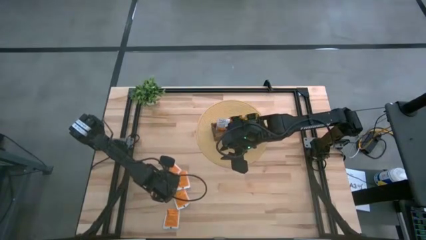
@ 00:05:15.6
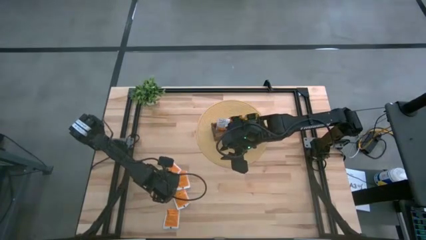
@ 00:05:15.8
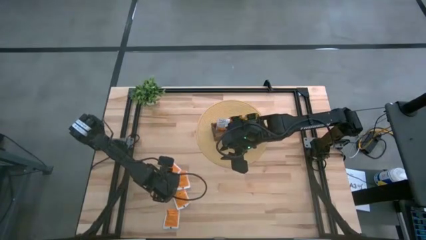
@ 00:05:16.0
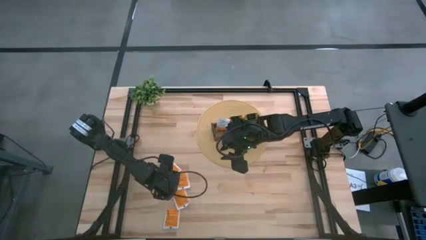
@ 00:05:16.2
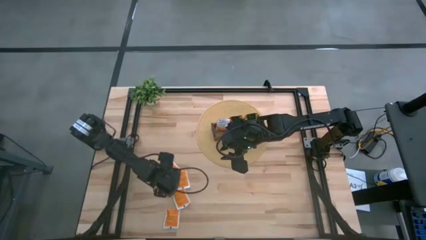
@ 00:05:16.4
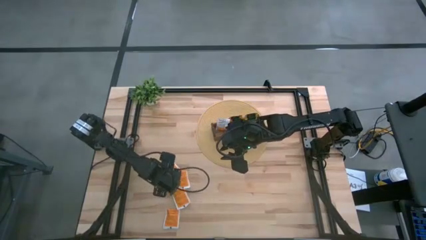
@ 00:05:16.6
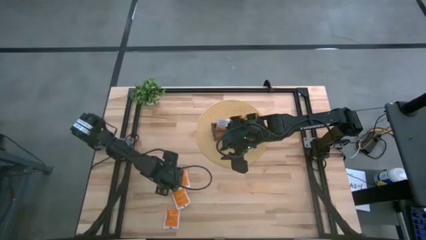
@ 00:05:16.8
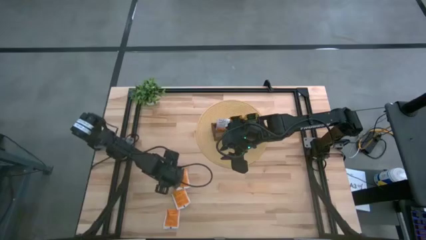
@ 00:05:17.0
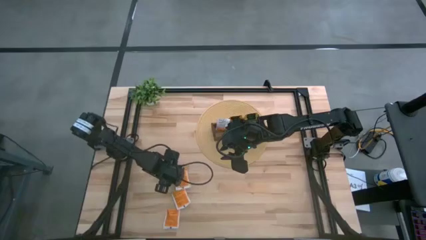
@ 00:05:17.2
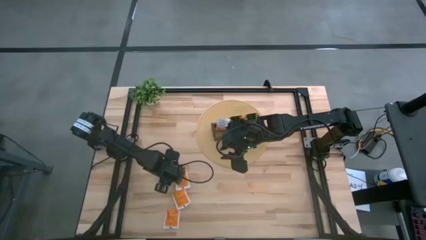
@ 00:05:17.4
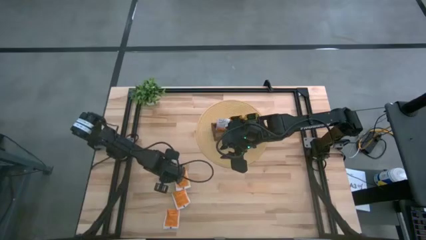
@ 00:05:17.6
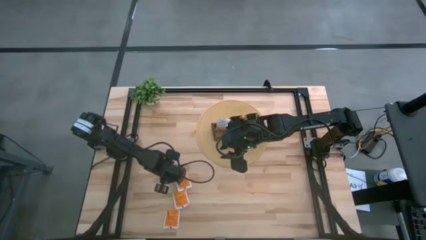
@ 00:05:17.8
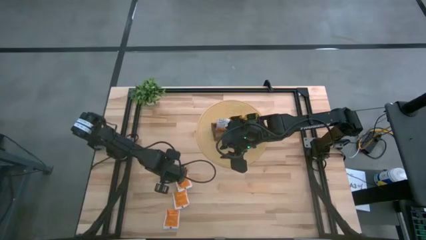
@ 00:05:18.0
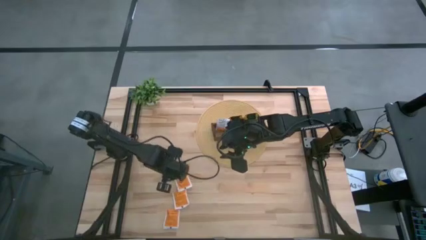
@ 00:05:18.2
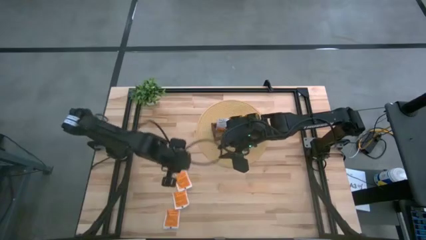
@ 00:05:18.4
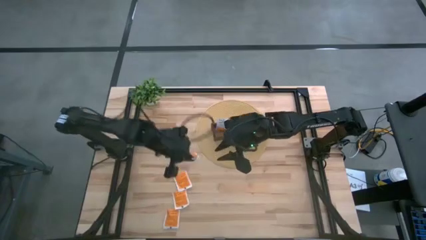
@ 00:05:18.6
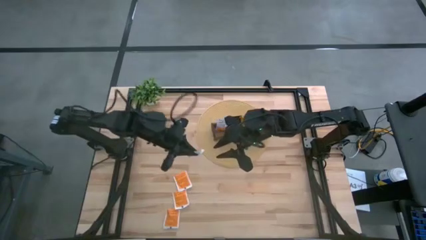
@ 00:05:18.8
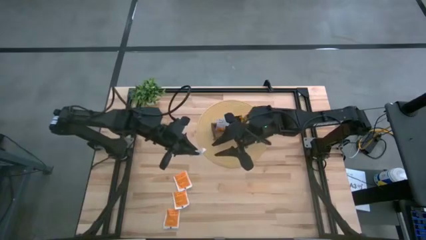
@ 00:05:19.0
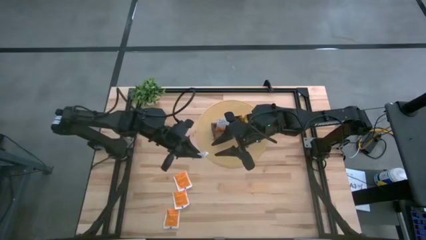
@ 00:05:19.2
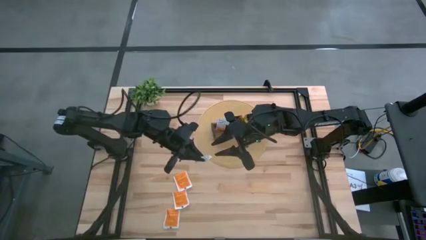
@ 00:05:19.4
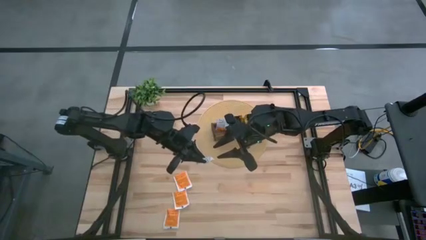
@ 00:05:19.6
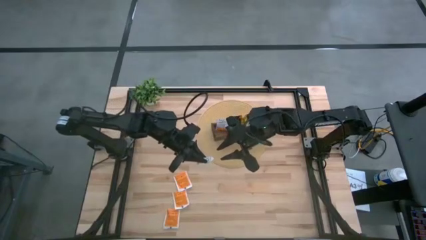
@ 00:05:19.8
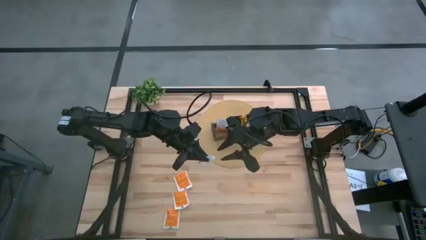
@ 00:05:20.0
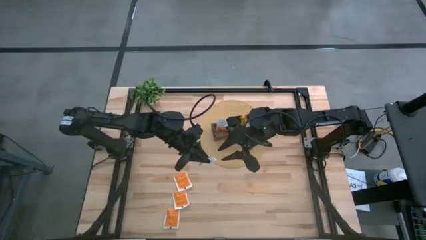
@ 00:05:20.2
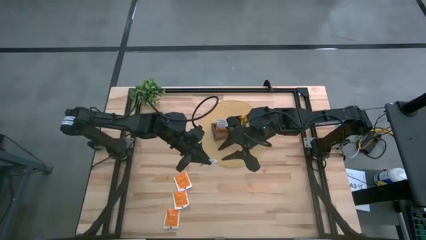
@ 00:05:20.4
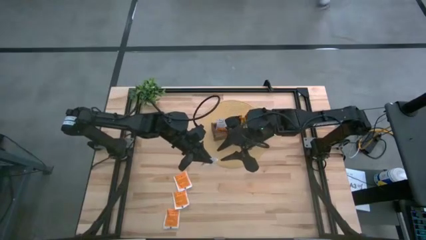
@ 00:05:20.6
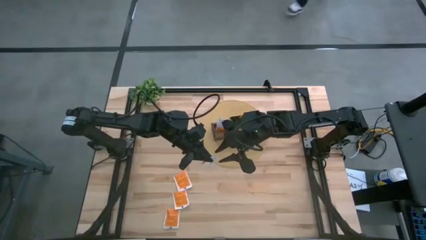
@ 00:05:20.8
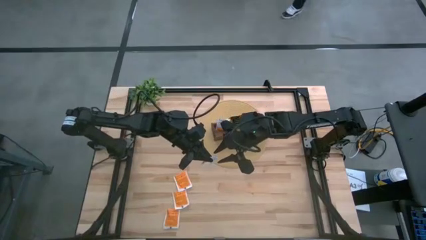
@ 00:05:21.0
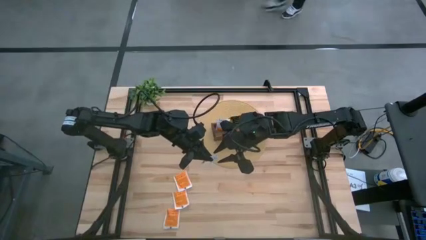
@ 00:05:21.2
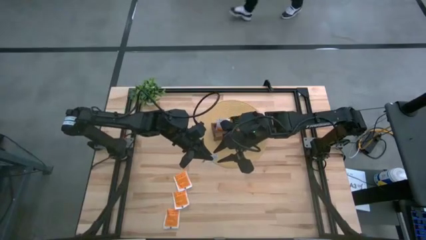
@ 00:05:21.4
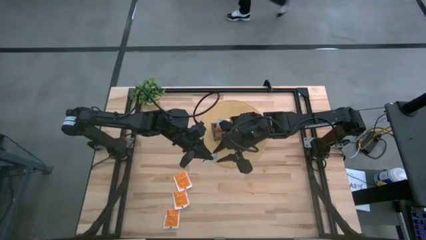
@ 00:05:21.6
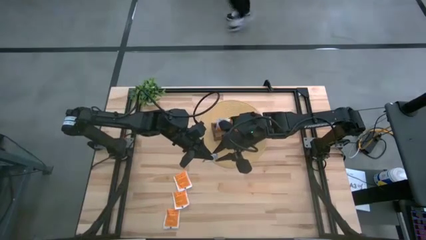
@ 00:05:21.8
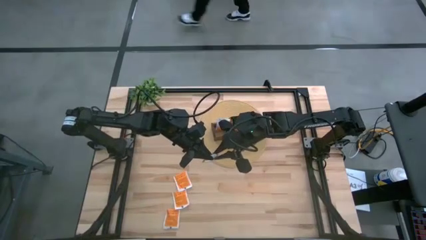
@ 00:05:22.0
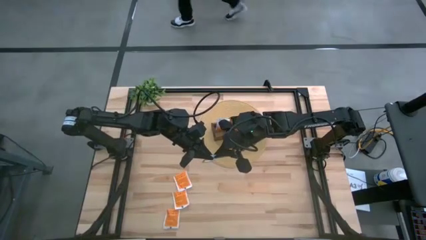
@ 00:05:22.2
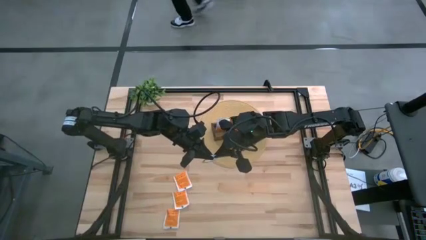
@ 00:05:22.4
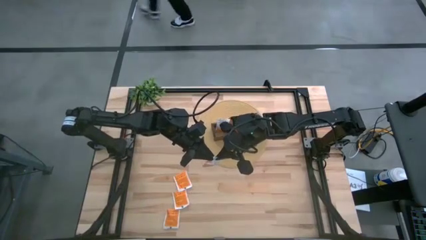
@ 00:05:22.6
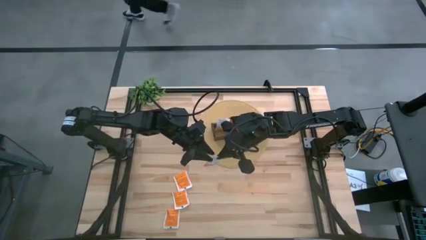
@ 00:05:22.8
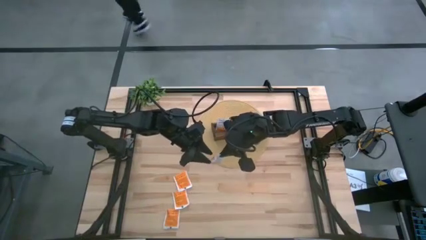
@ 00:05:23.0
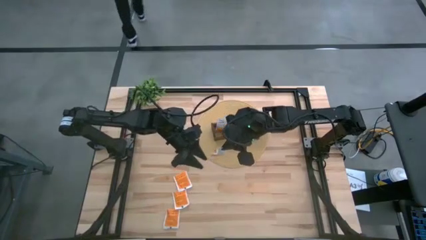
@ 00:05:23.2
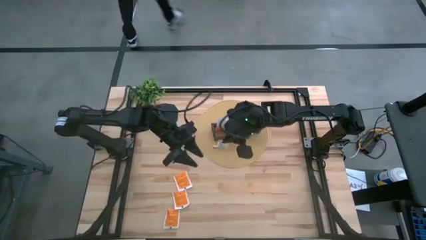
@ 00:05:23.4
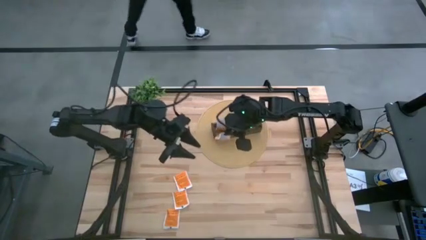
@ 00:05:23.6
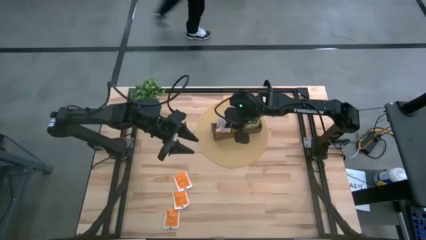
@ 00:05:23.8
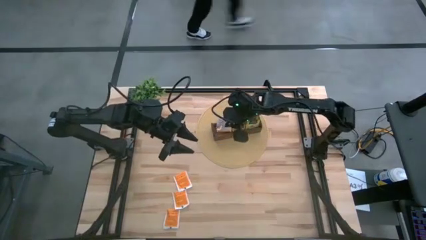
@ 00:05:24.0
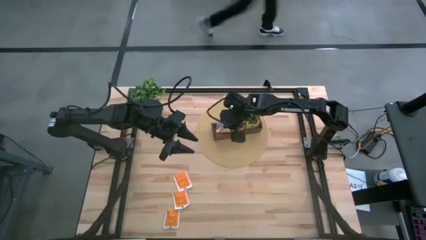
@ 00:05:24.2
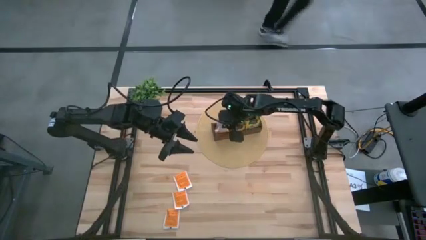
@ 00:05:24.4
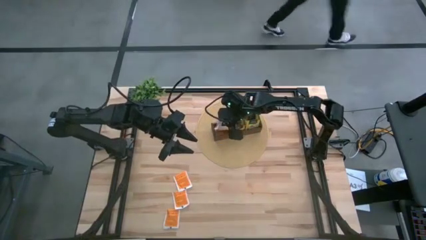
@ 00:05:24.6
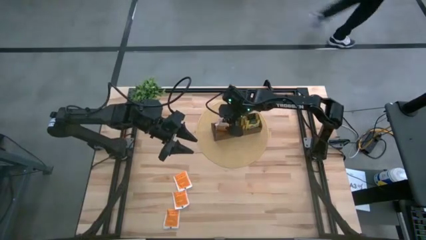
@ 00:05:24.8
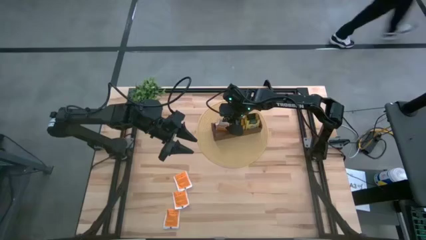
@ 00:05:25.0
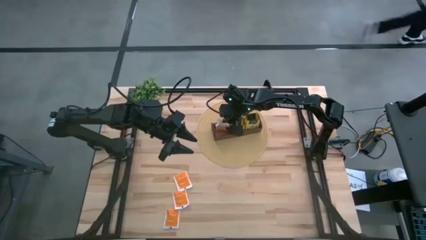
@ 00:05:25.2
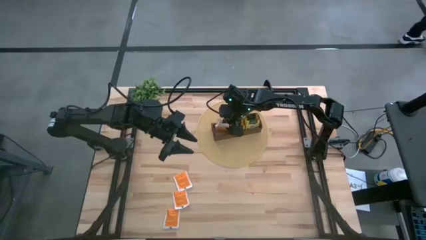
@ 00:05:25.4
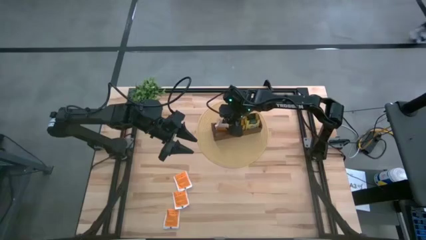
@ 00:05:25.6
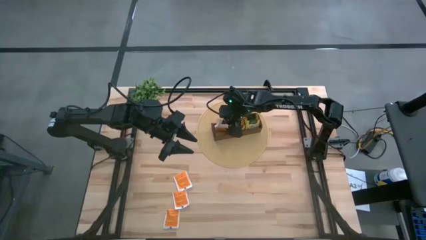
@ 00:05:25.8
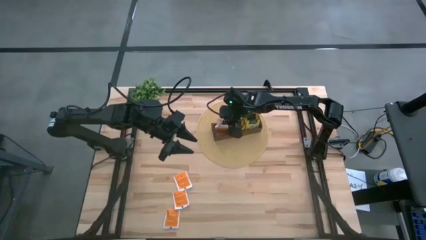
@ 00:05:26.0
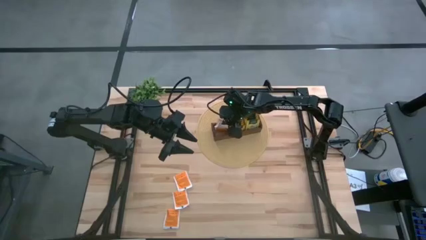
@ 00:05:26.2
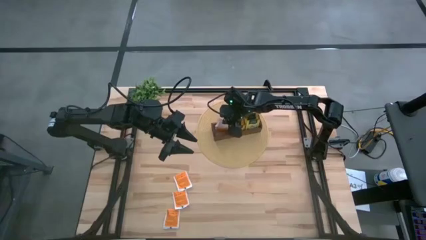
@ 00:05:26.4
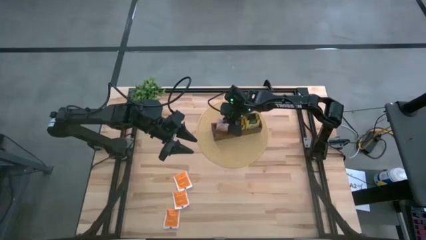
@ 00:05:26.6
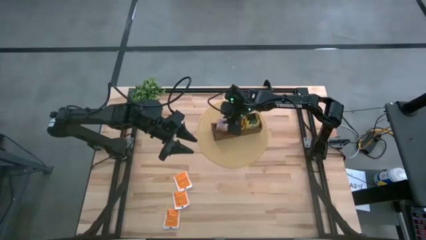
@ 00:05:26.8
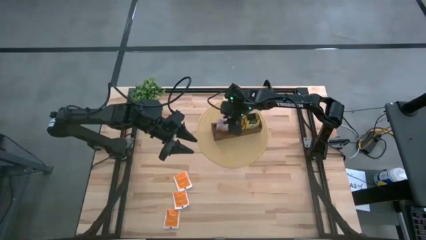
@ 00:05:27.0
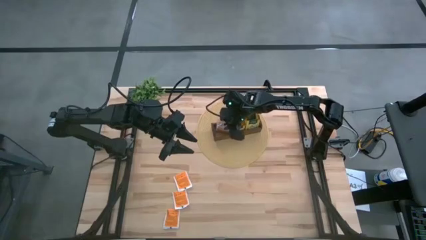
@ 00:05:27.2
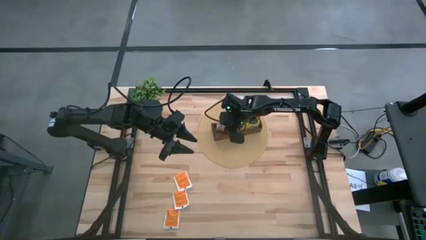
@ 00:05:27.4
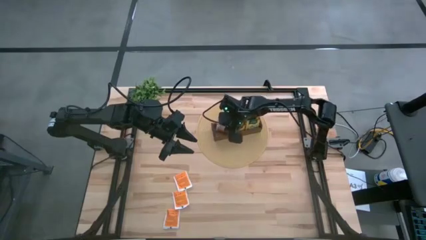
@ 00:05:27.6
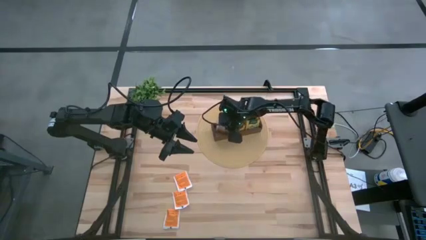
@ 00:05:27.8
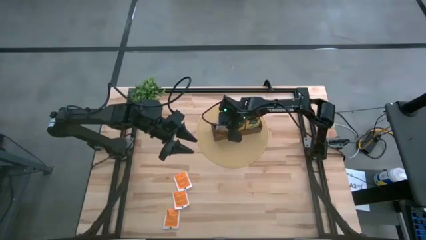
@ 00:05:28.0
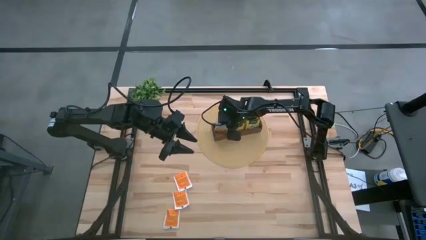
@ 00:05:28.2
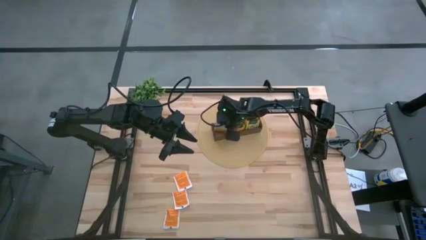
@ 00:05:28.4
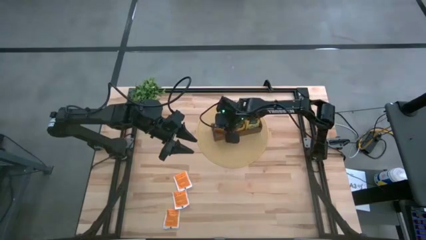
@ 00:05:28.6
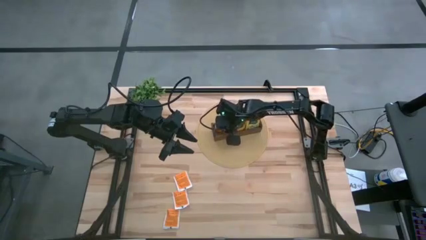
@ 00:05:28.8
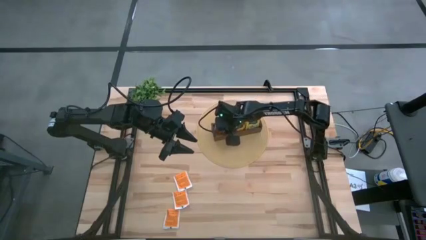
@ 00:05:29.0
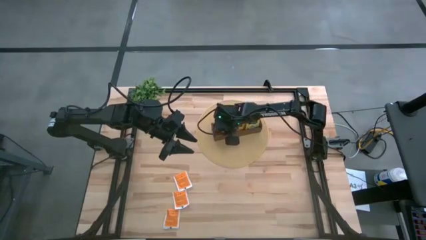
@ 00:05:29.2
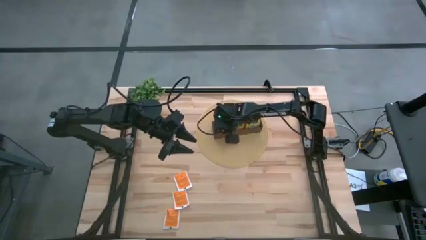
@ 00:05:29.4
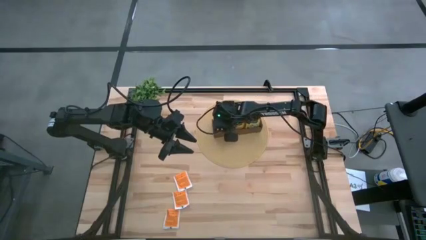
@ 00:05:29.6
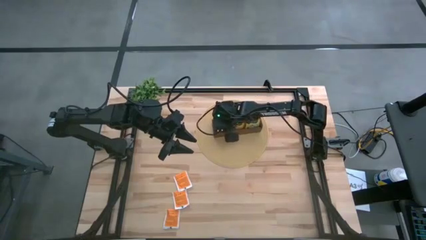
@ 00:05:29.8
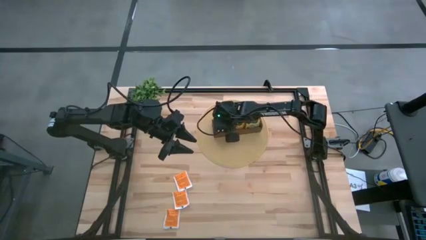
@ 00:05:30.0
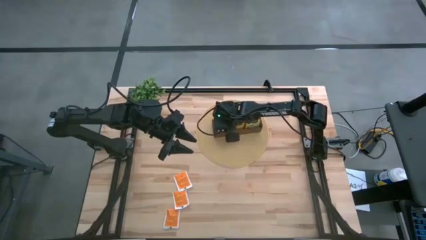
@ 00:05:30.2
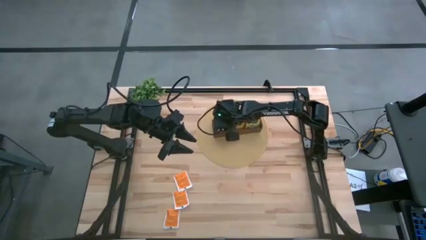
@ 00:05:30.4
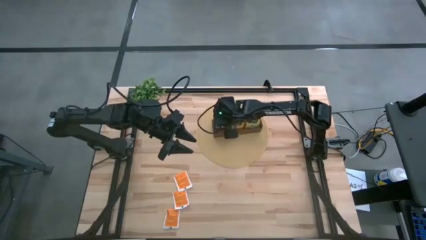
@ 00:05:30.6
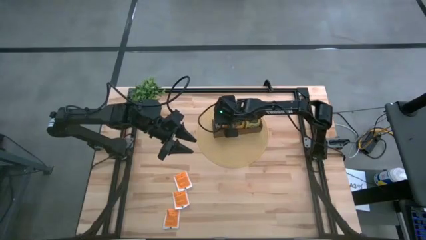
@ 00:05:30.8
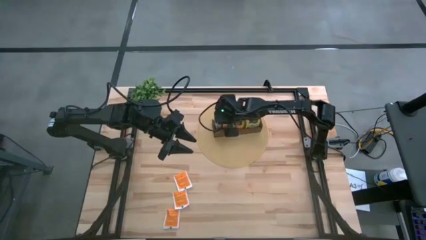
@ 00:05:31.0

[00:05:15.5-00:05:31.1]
Task: Pick & Place Tea
Put the white tea bag into the left section of the wooden organizer
